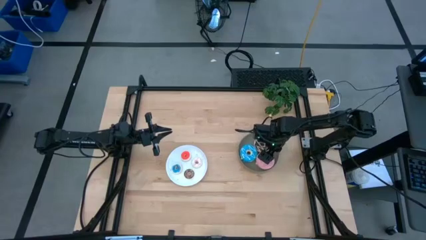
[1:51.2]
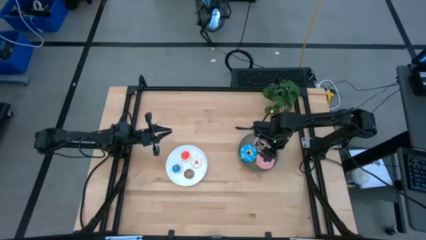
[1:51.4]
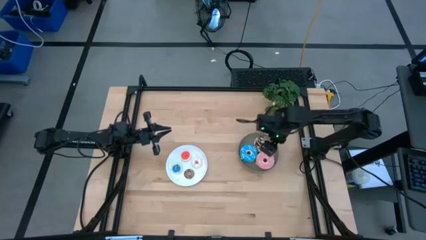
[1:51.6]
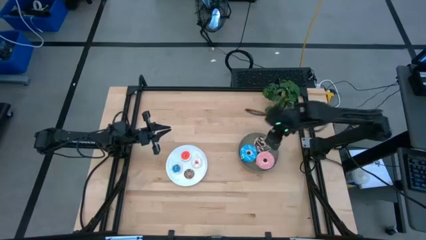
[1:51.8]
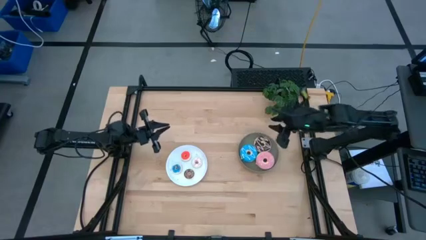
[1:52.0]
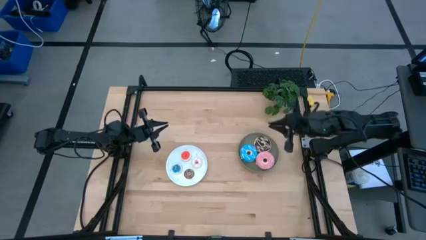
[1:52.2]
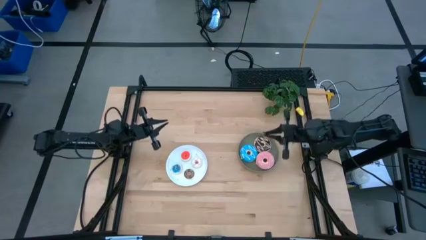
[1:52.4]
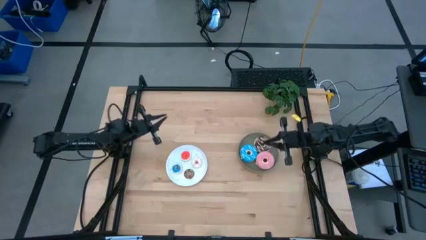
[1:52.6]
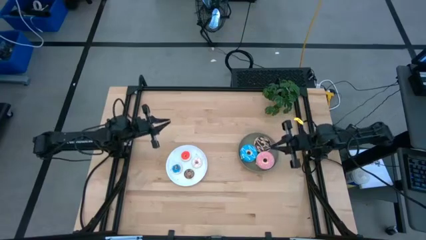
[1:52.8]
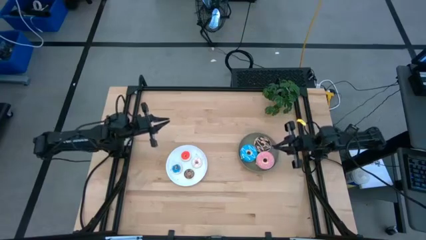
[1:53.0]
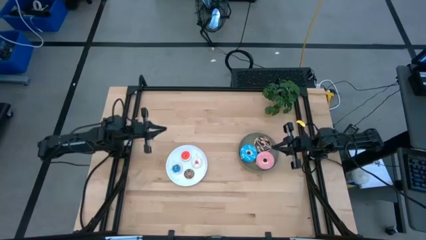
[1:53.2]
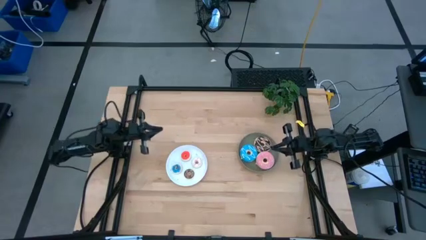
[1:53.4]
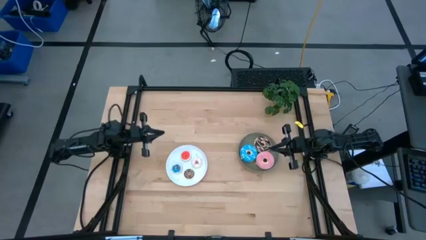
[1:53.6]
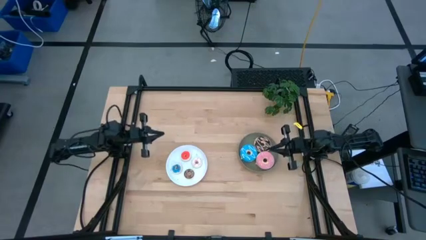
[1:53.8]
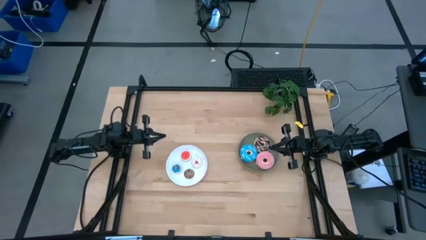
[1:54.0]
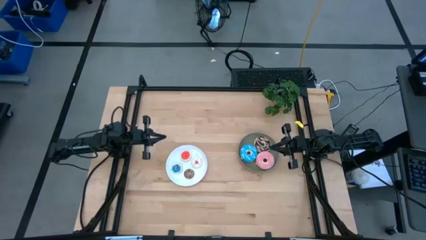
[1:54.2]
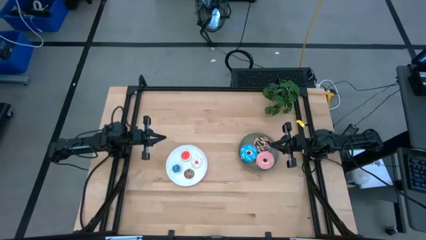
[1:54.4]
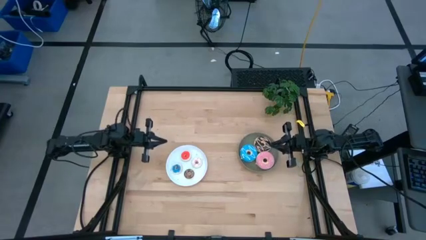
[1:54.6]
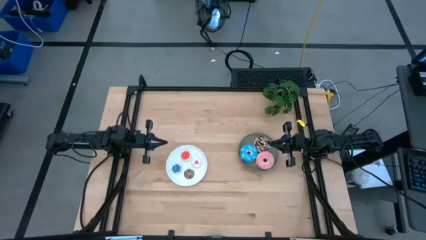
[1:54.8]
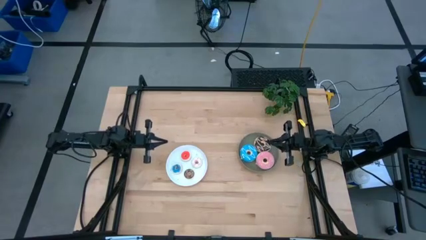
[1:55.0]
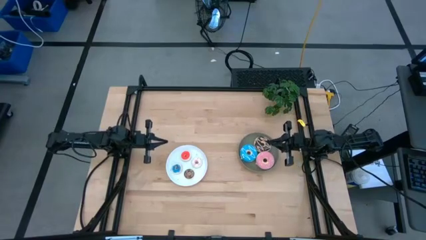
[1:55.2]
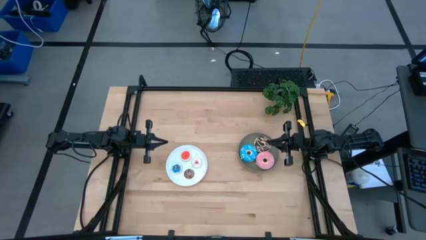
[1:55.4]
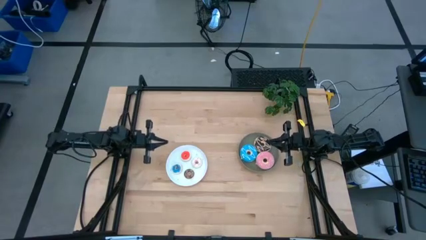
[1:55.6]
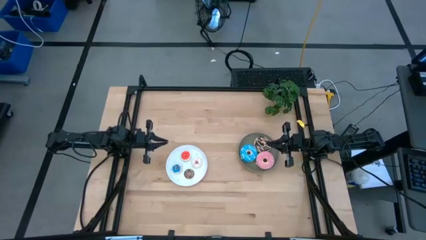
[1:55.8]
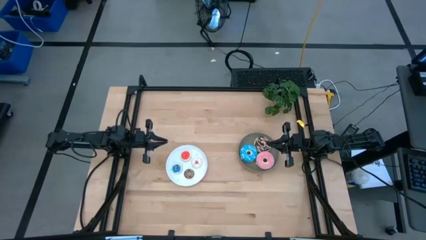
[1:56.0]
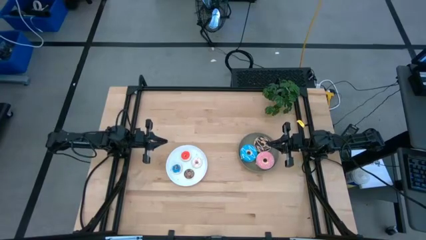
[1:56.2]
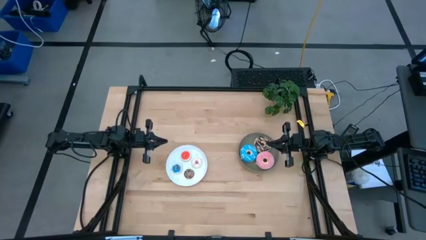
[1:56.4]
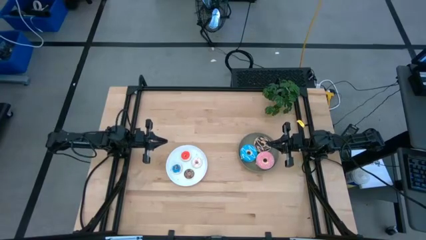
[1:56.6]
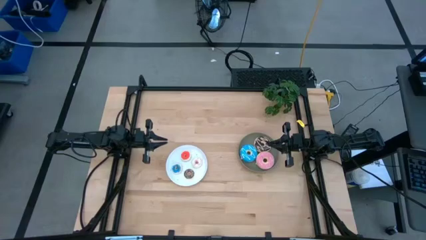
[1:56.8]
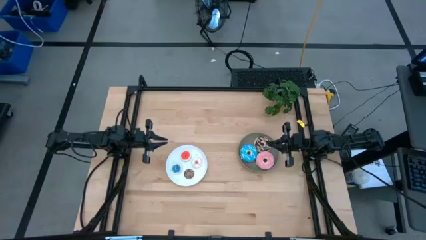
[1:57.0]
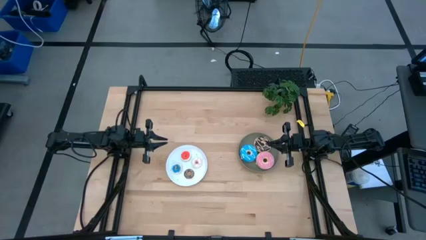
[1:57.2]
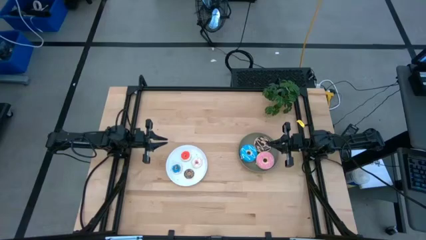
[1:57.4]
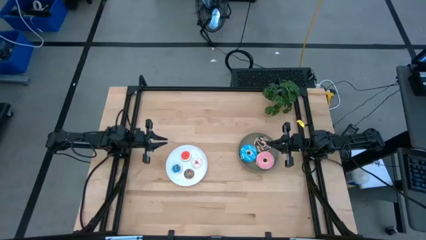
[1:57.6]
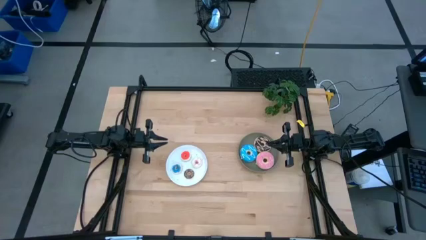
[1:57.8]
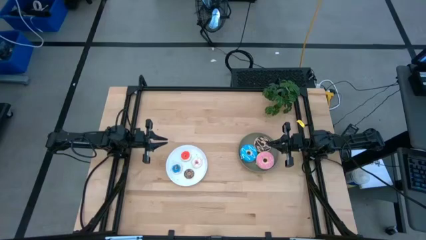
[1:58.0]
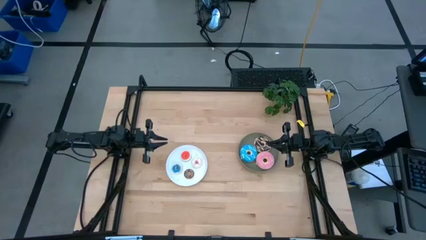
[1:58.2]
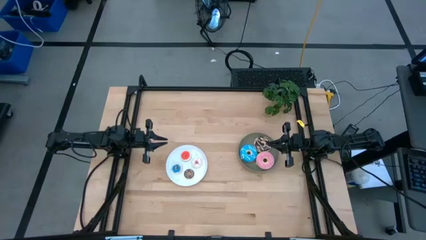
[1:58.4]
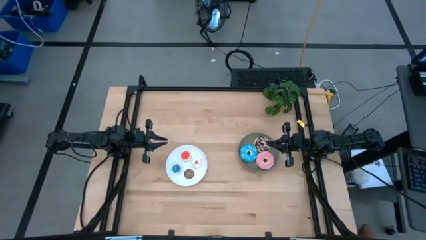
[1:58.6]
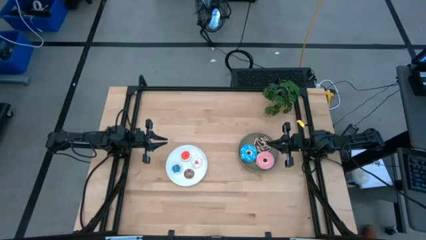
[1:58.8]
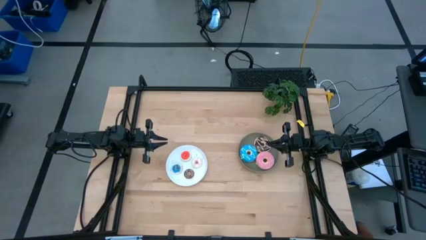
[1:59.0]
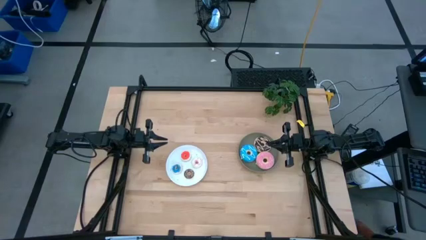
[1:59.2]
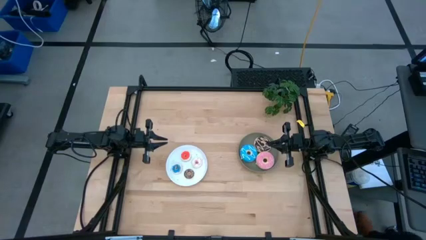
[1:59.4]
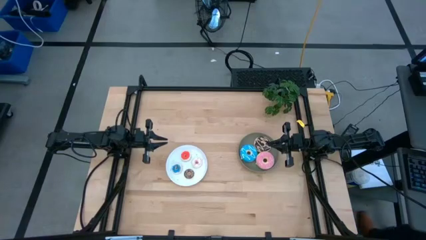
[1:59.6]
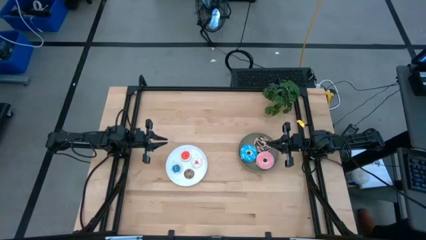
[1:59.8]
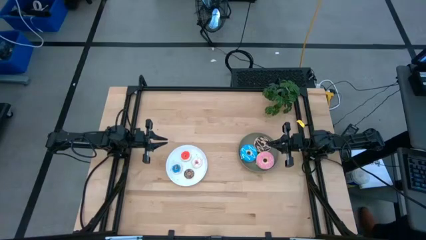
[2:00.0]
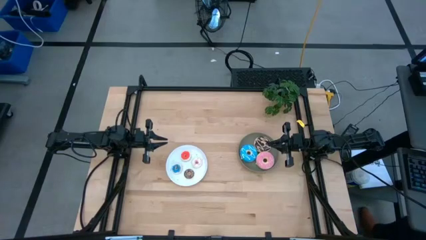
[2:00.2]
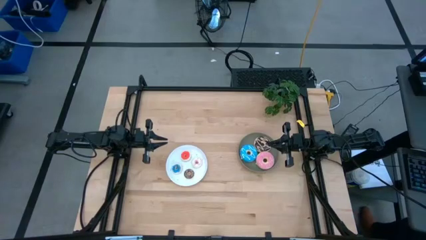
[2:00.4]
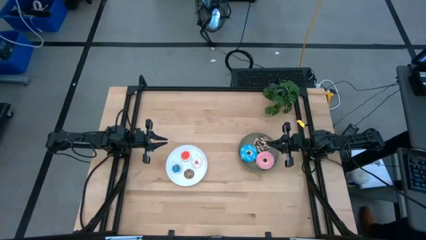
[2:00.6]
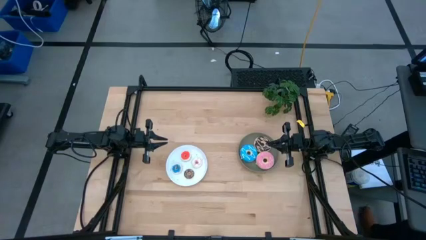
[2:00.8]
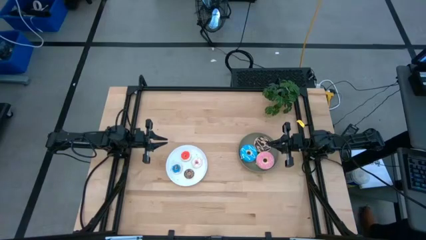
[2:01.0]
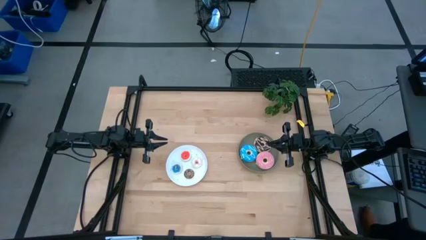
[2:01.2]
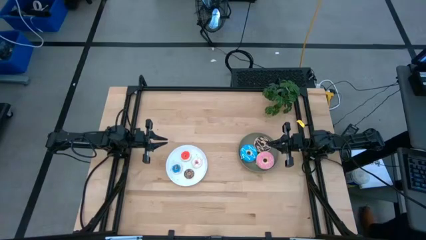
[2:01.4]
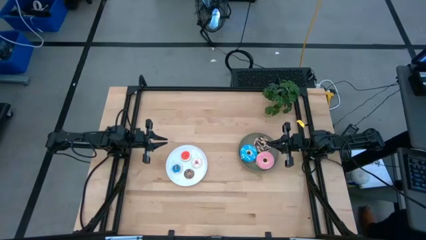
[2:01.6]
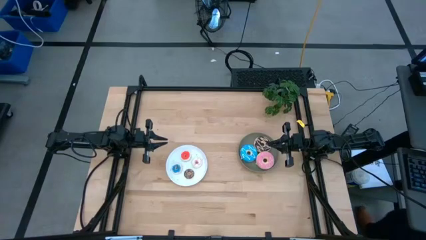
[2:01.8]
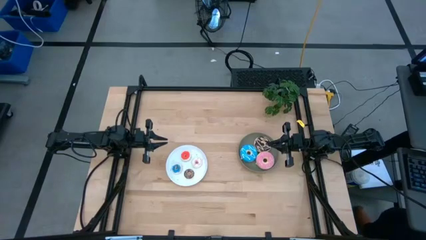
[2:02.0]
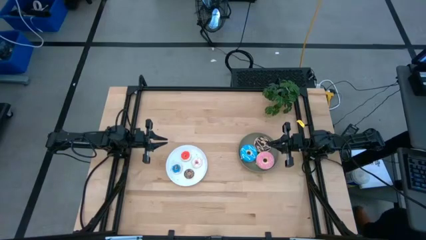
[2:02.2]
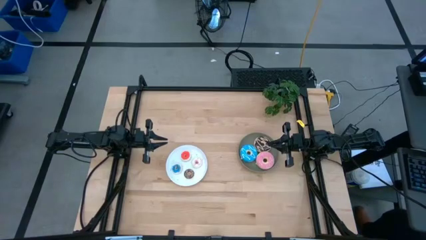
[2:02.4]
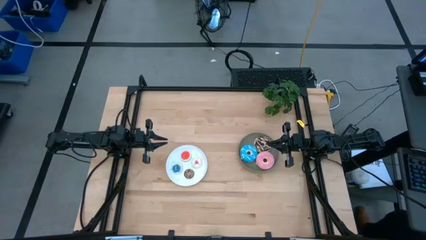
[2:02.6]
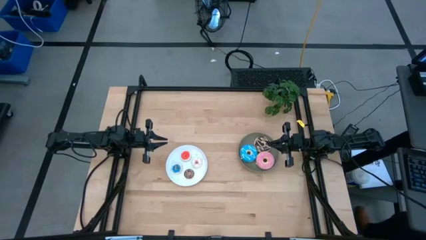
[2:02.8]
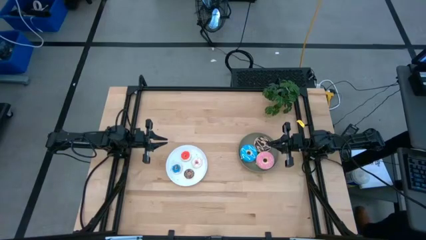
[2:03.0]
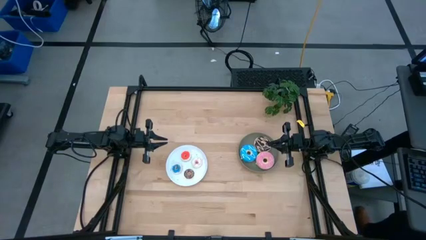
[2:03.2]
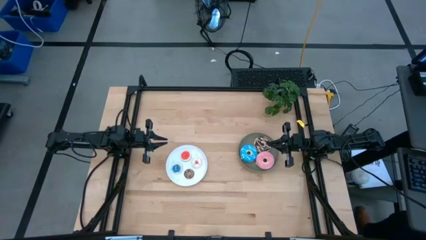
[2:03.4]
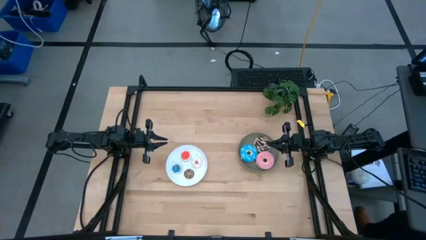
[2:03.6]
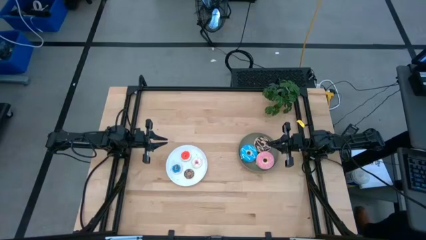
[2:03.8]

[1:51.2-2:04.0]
Task: Pick & Place donuts
Return to Home Position

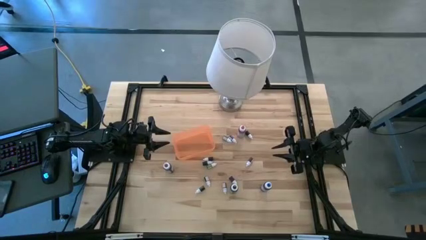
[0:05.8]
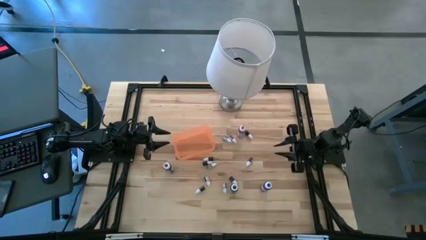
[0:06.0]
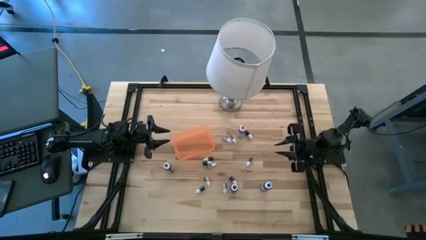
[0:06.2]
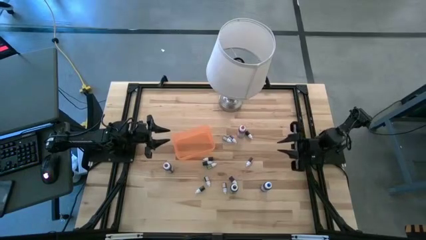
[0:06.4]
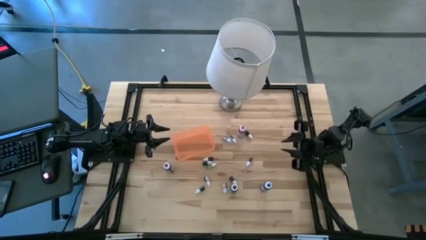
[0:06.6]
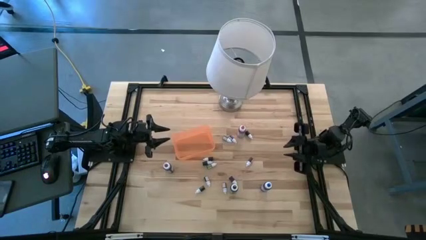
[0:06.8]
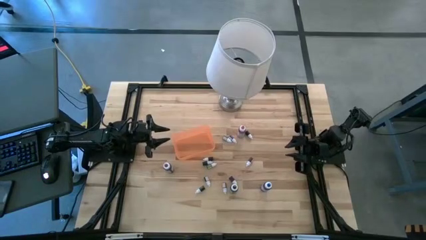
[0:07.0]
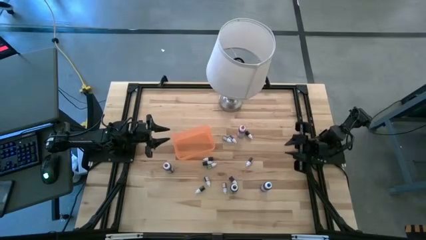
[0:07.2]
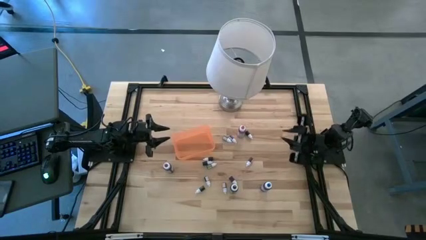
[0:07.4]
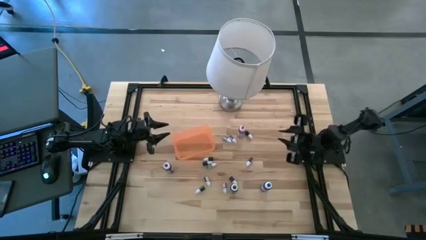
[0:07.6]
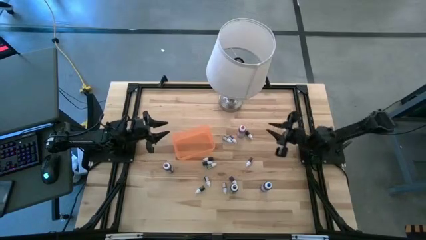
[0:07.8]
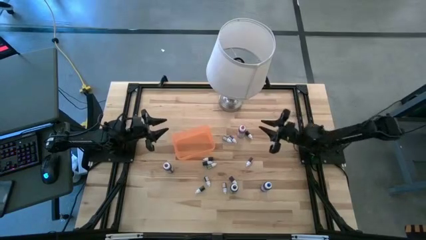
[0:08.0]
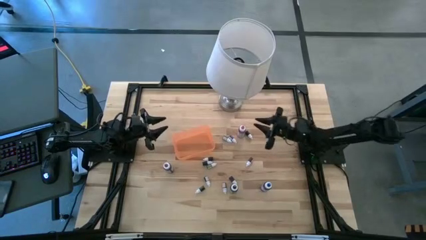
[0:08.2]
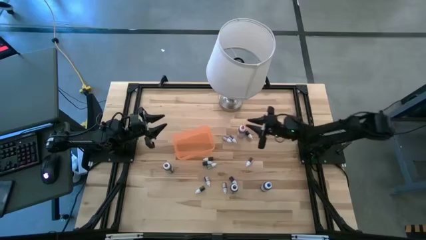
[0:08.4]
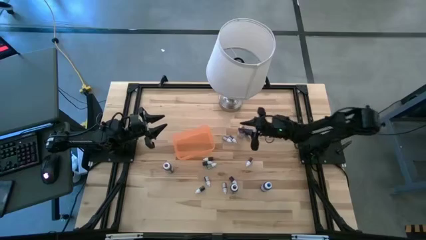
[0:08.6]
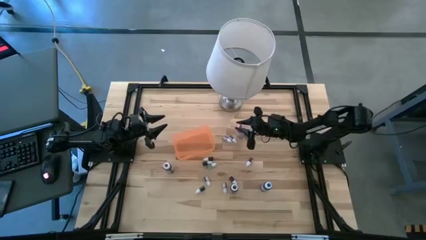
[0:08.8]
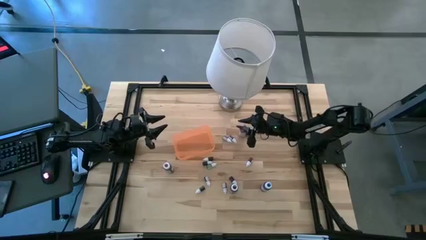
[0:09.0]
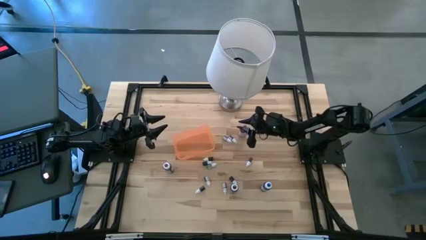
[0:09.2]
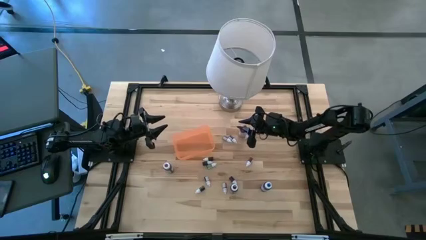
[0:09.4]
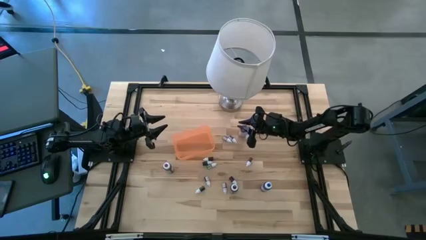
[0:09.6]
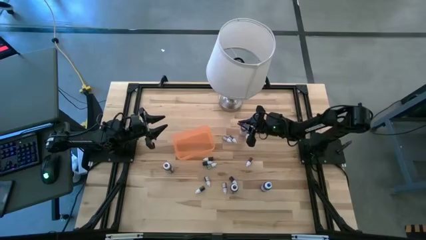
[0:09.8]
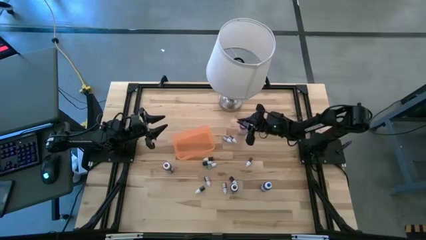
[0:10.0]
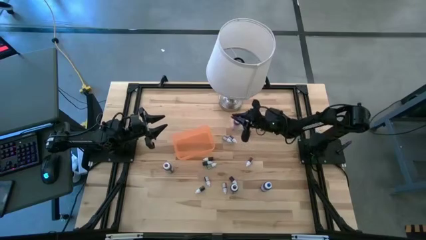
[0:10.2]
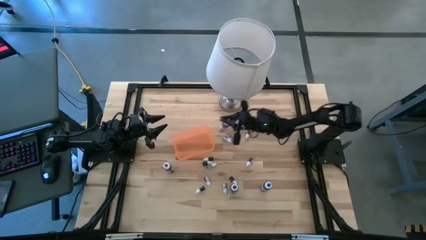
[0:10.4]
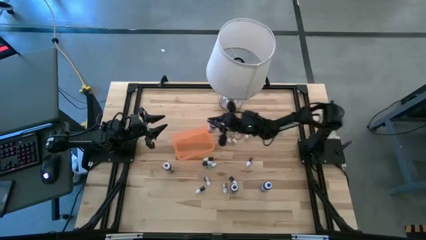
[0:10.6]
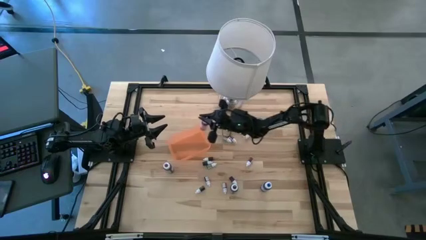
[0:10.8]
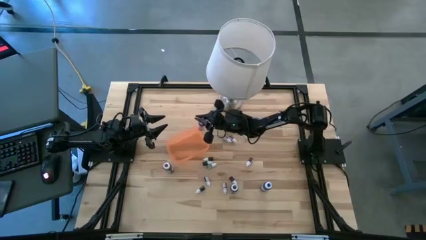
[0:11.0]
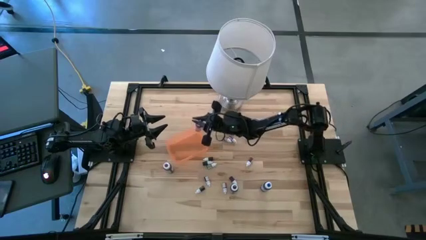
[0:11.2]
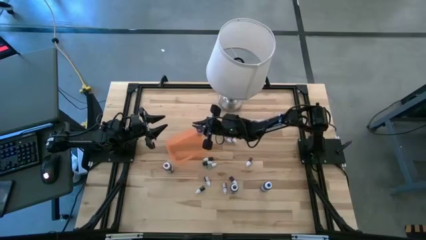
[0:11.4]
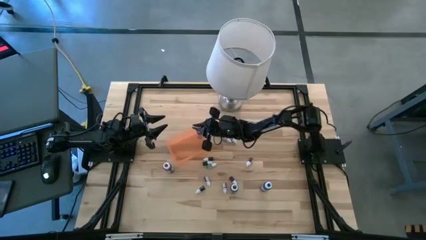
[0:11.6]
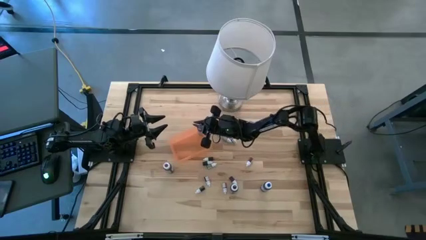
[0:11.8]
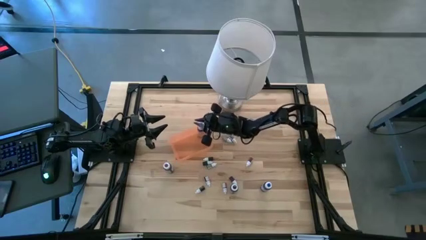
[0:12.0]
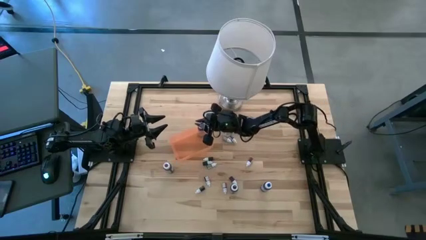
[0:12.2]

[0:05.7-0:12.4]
Task: Pick & Place food coloring
Put the large pink food coloring bottle into the bin
